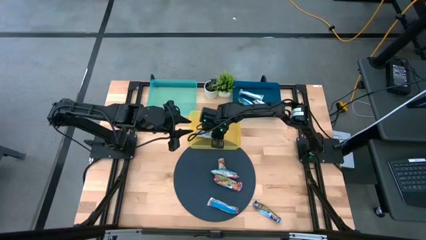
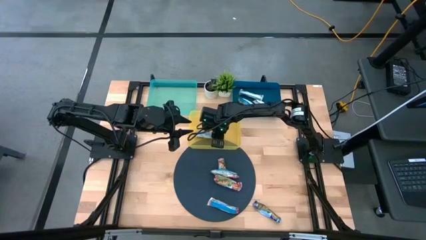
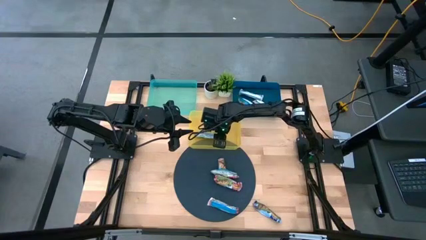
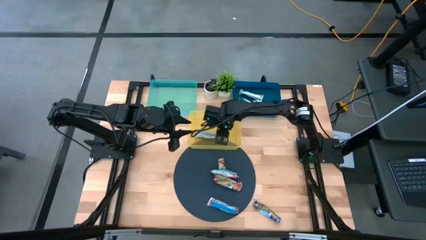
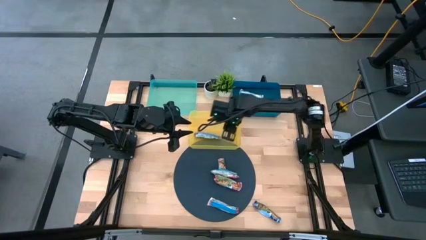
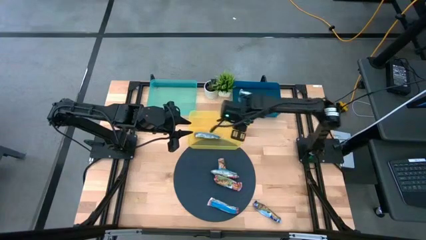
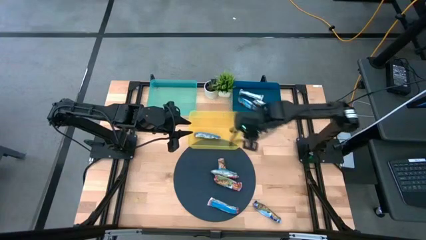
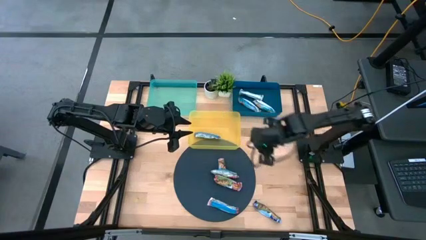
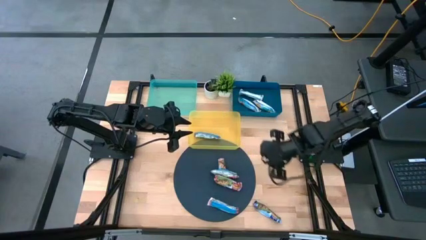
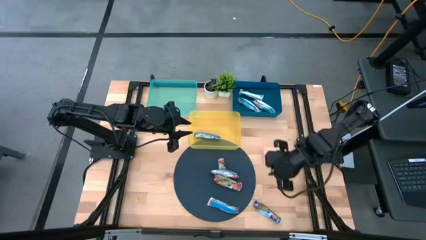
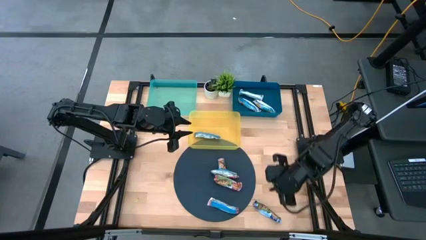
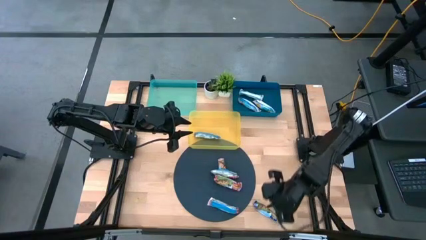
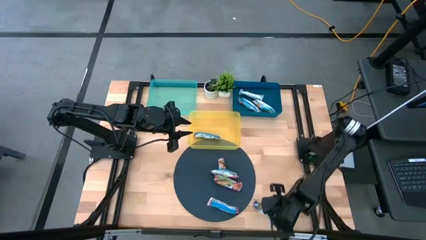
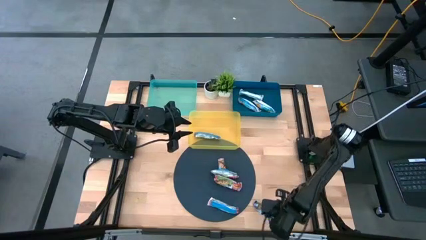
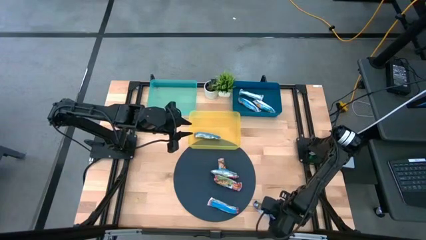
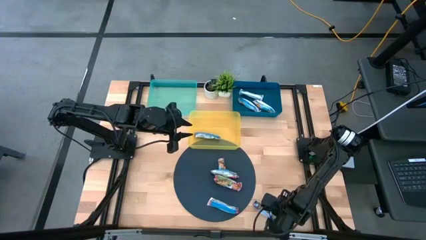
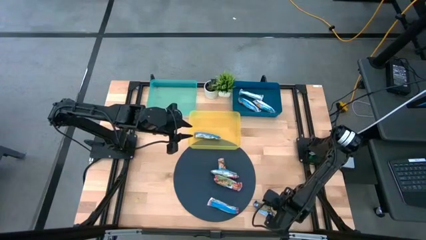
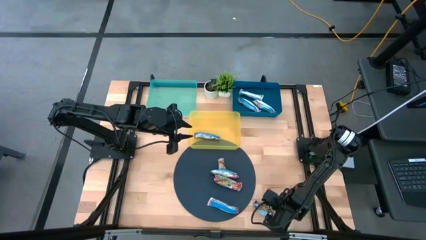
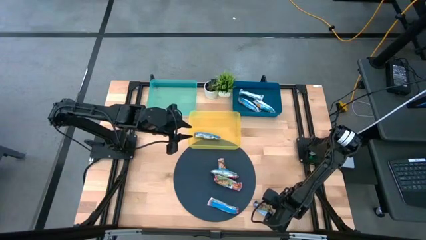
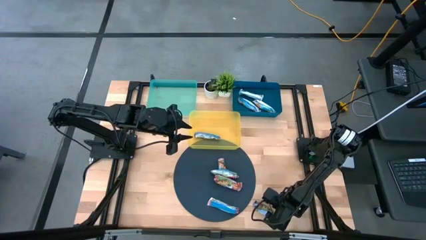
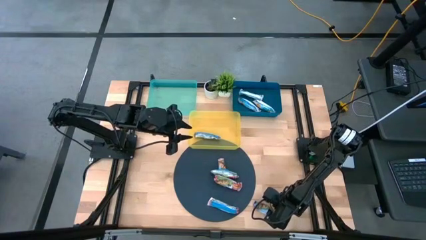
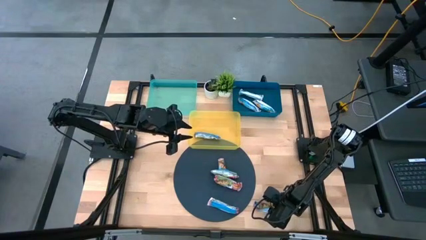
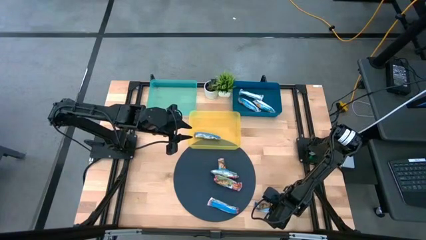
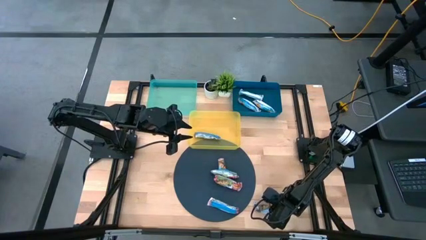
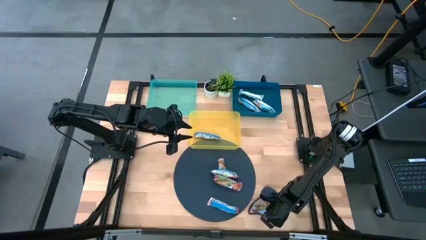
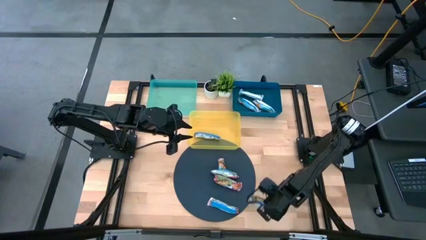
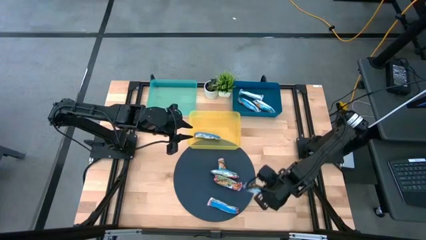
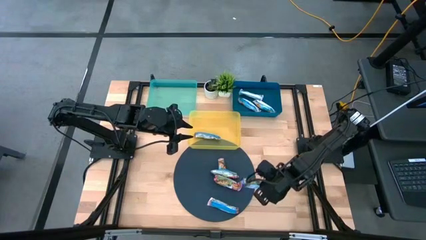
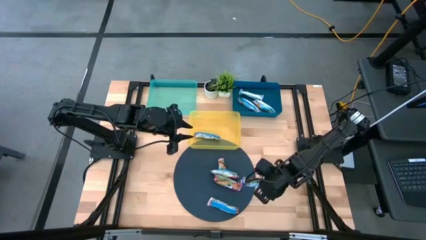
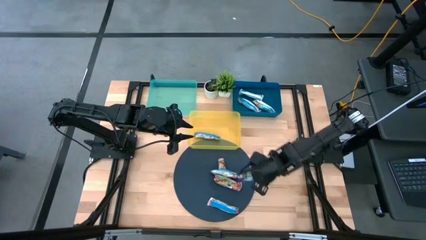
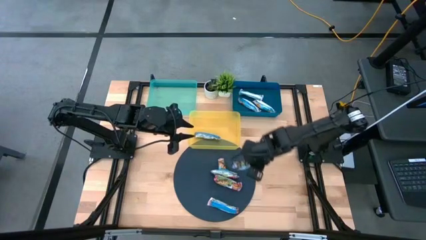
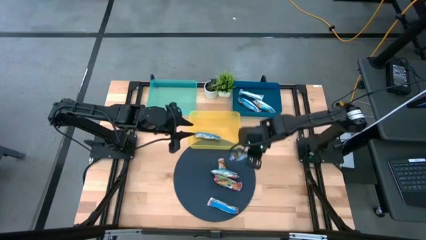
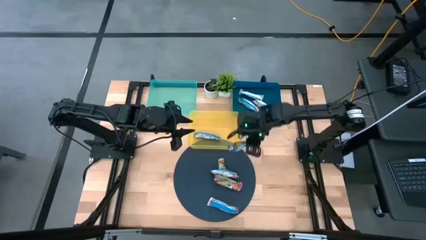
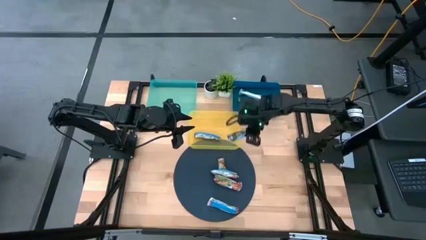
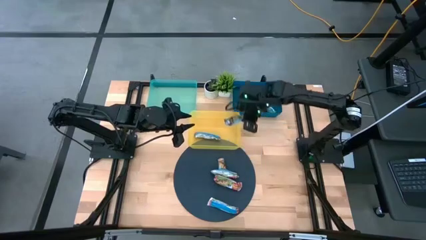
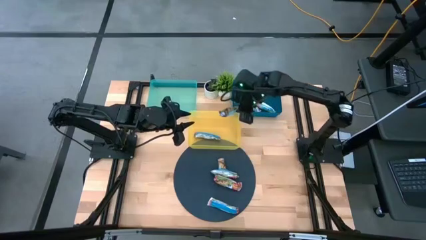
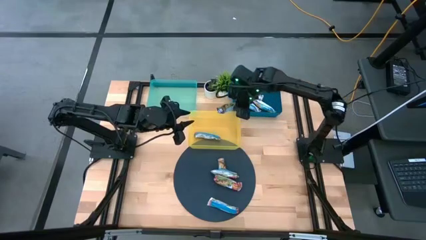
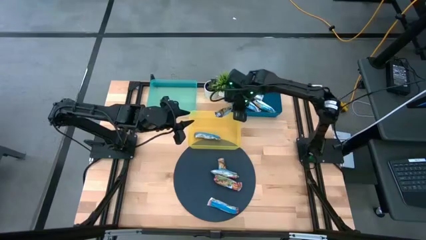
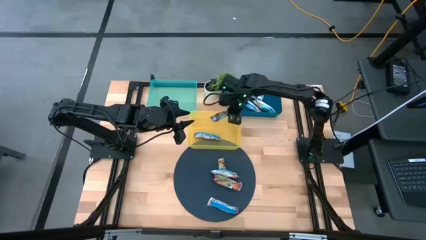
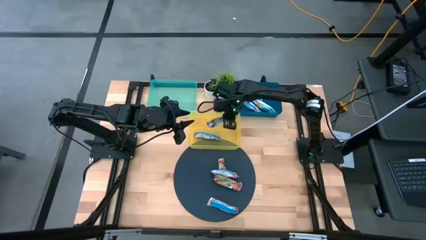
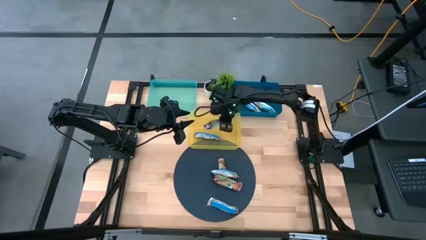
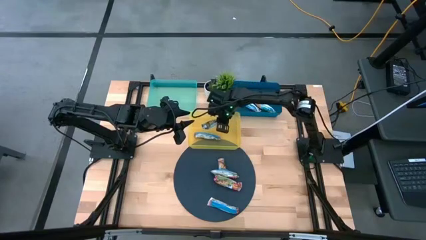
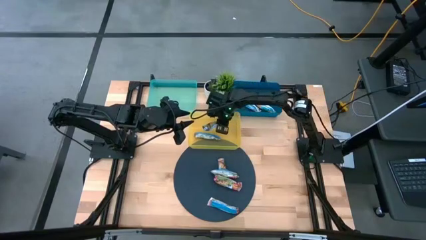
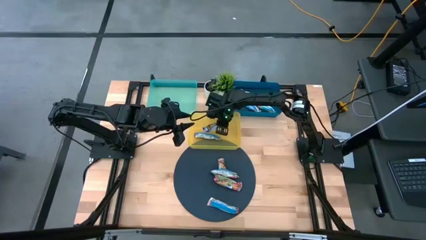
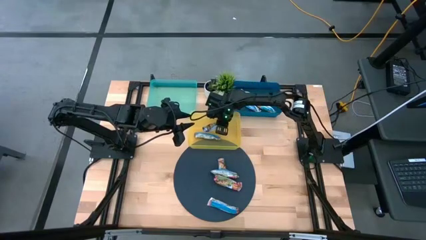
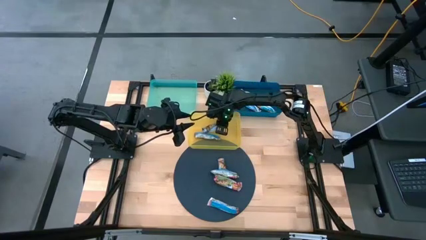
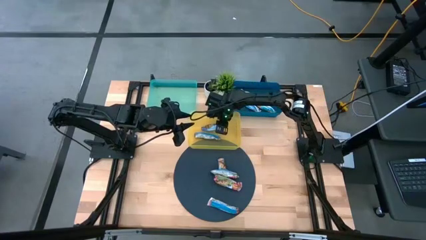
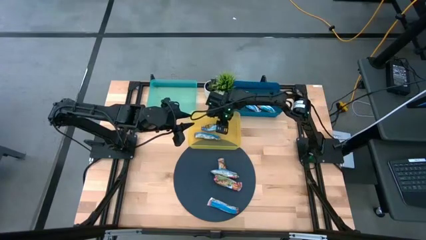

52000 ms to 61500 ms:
Task: Pick and place Granola Bars by type
Put the blue granola bar into the yellow bin

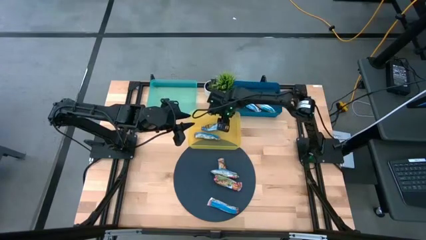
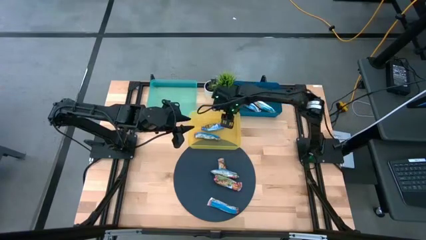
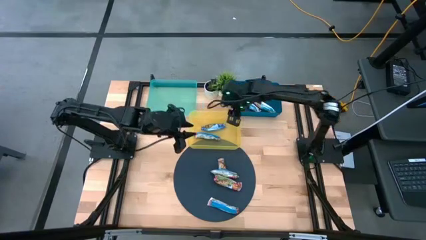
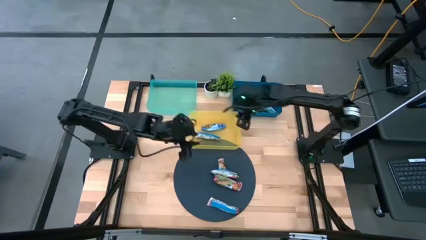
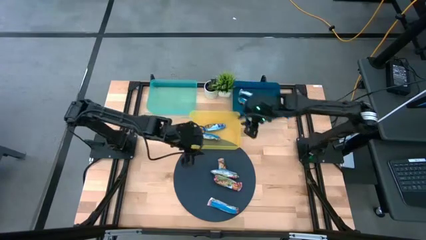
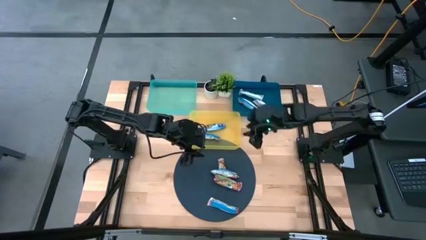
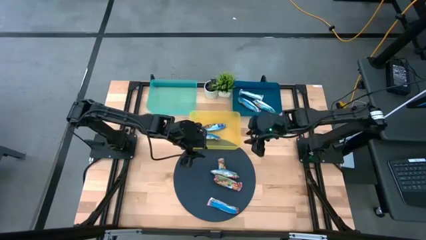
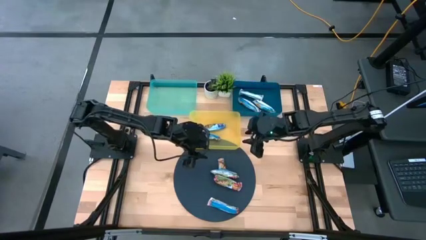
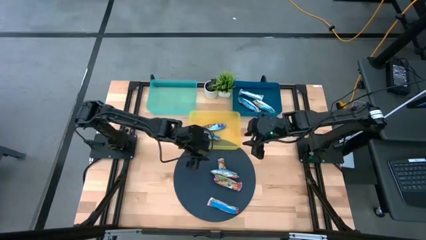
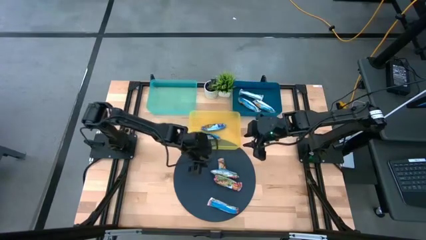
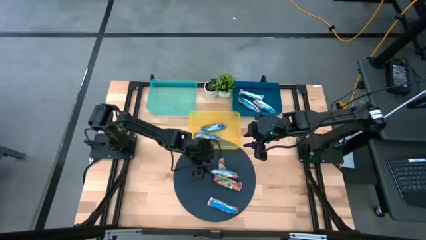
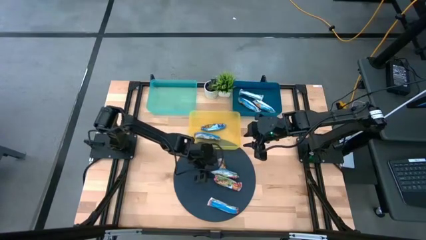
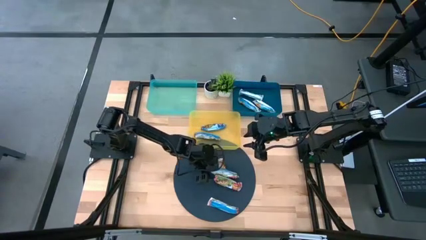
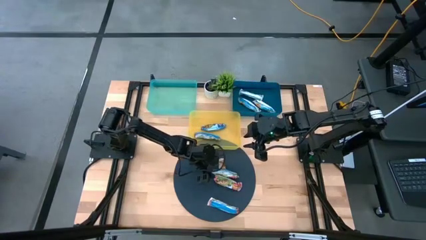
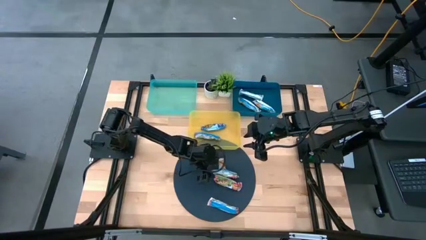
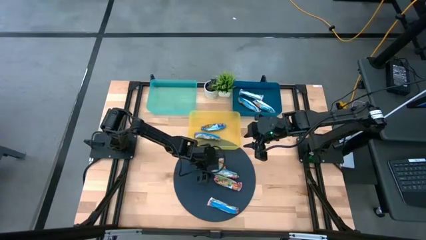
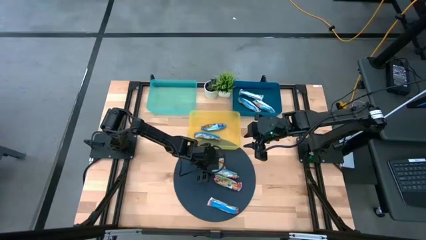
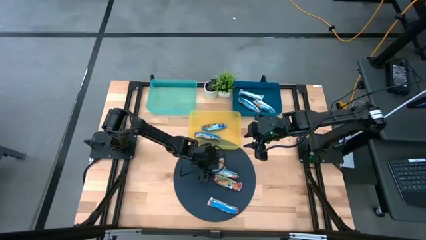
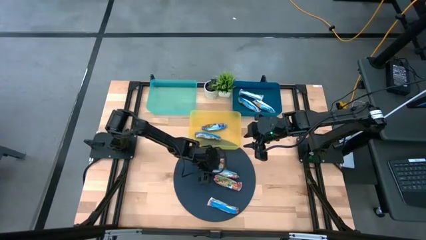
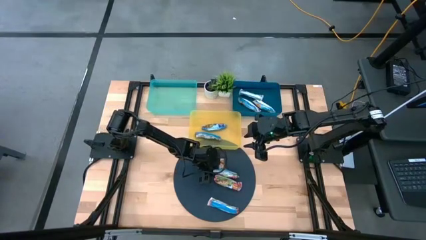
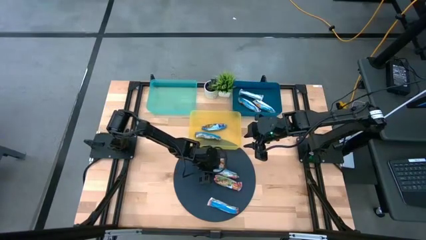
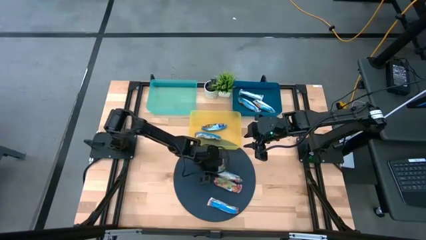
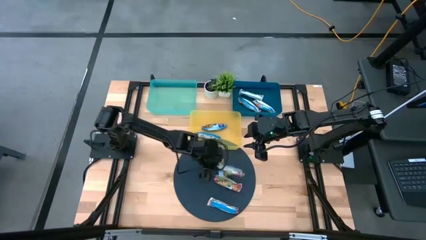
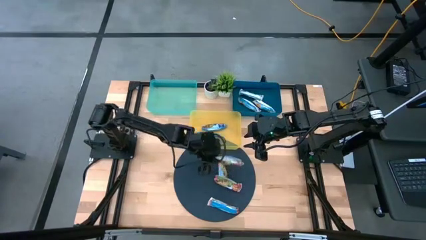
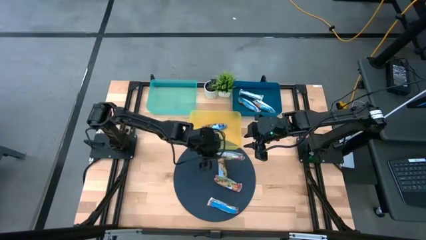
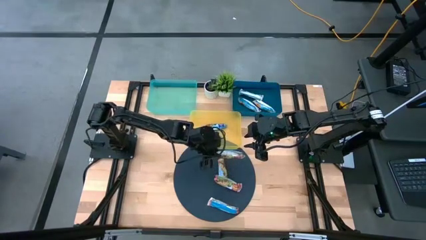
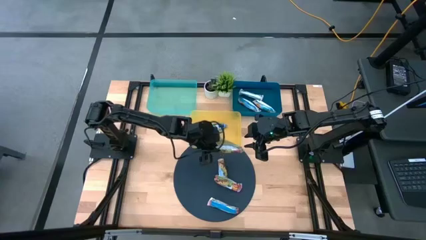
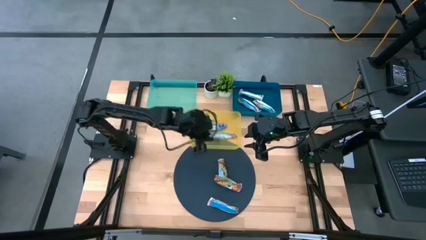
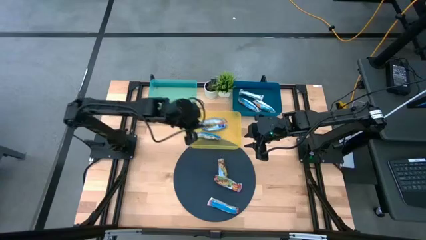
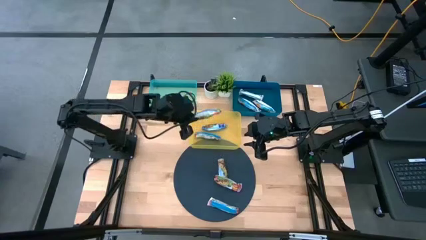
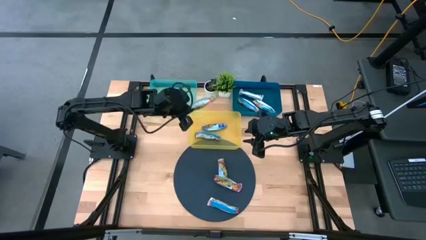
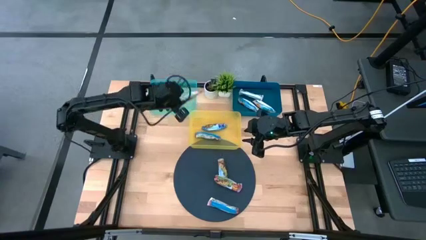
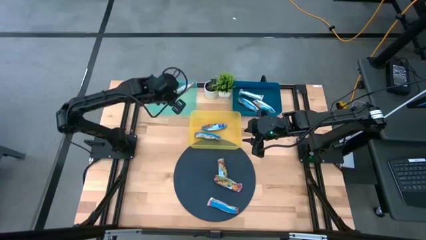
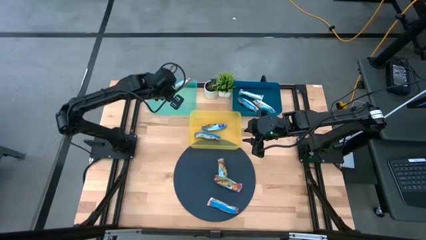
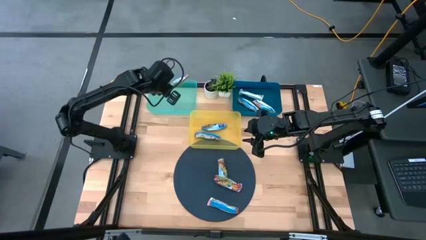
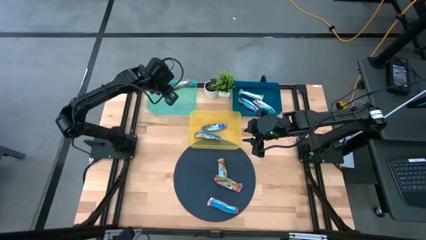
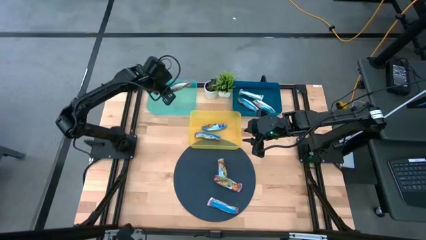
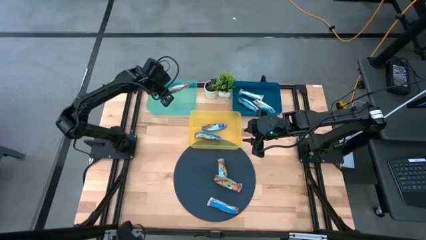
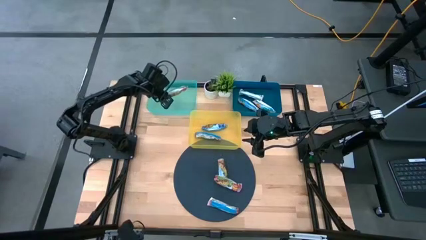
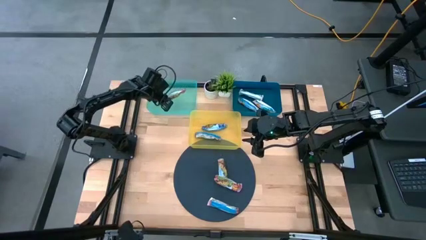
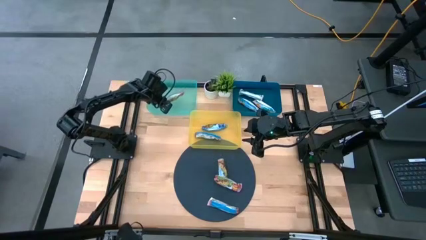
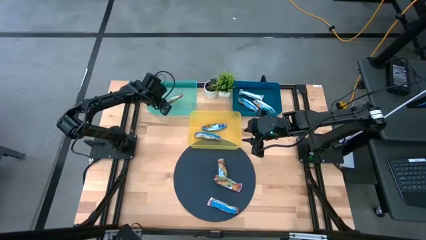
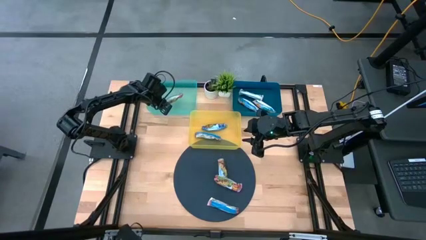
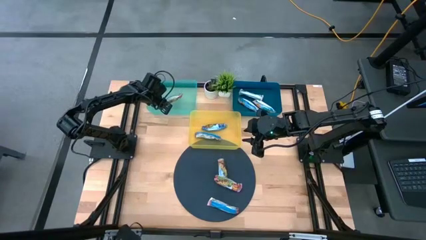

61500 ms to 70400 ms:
Put the red granola bar into the green bin
